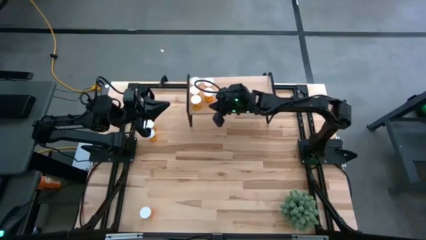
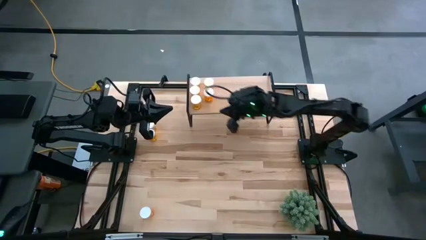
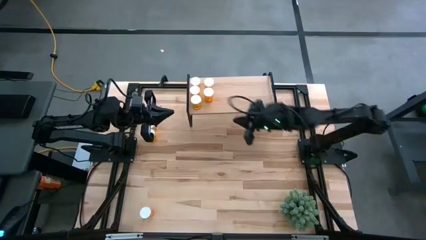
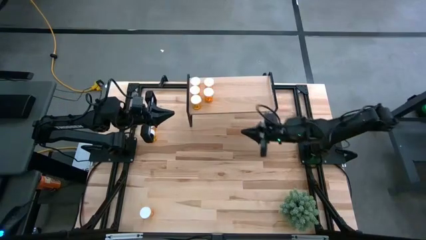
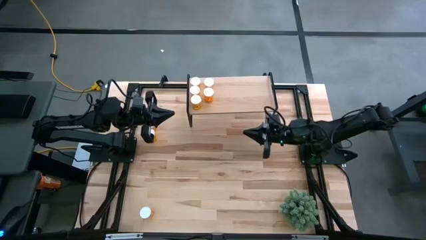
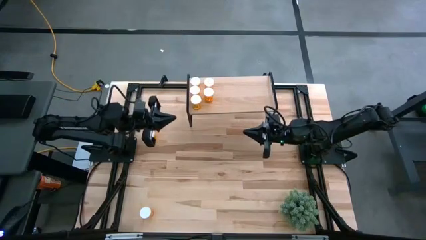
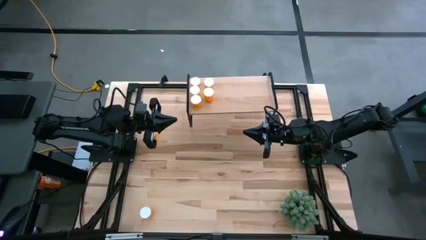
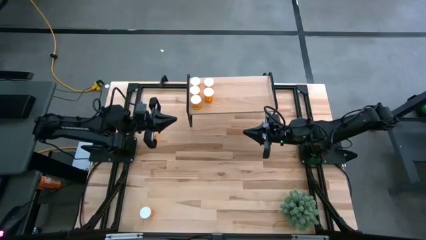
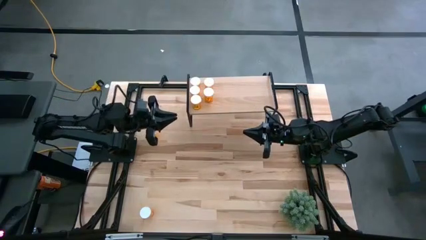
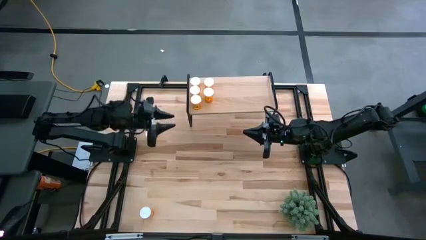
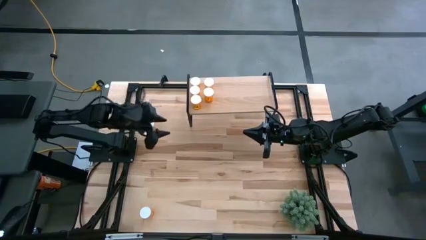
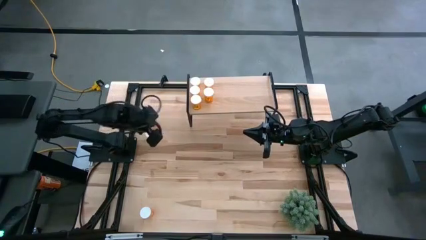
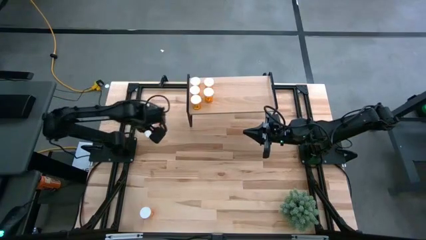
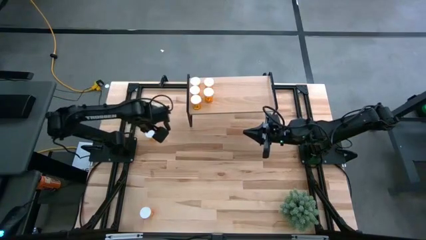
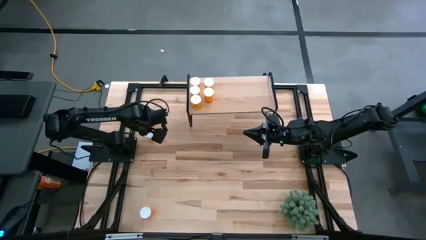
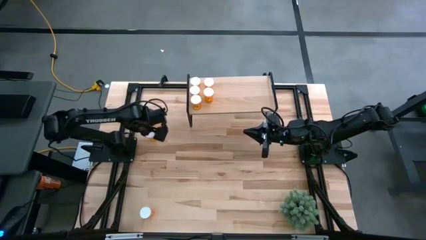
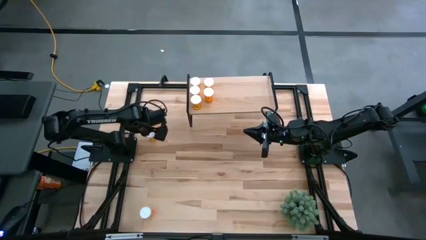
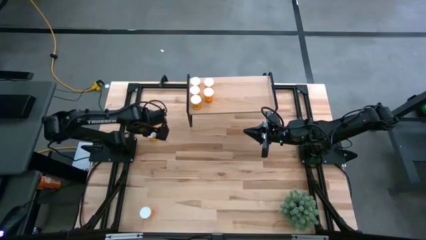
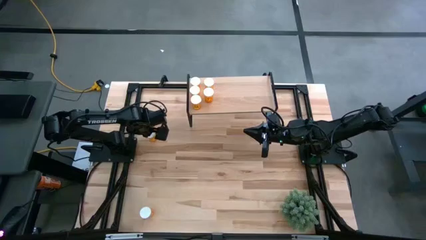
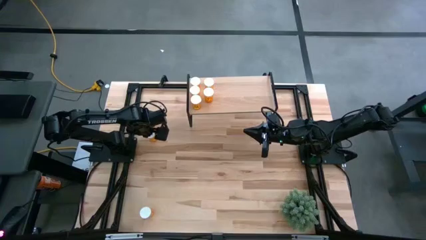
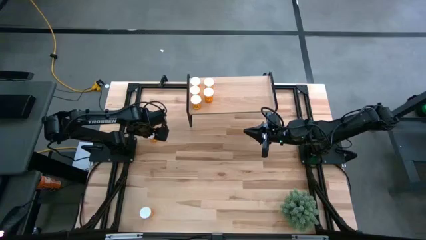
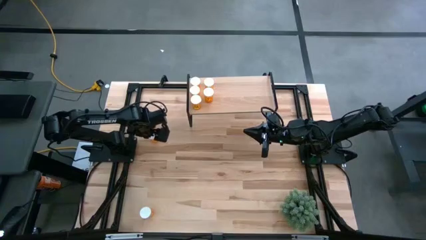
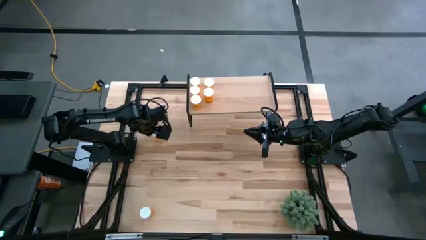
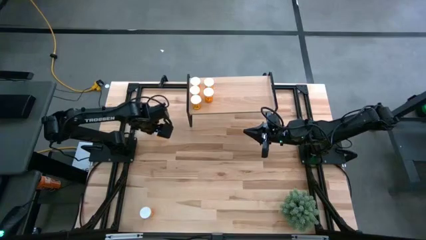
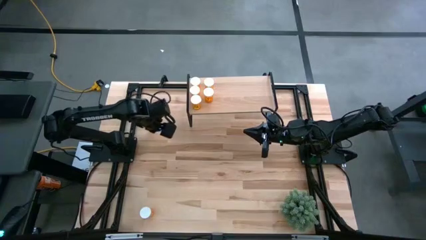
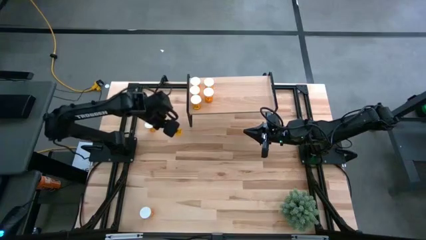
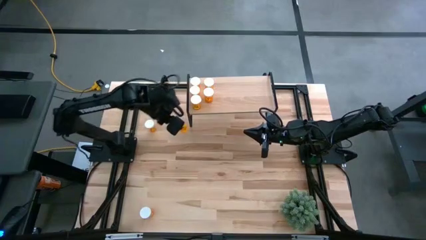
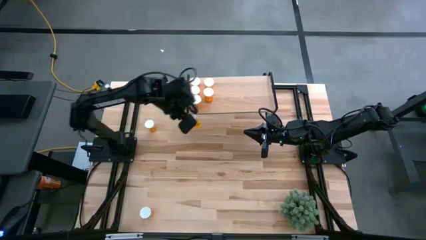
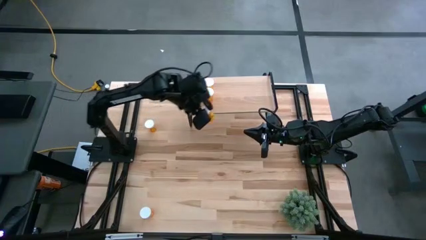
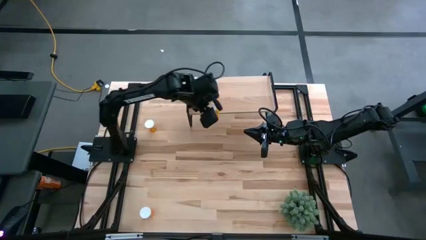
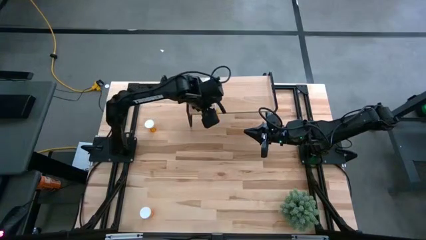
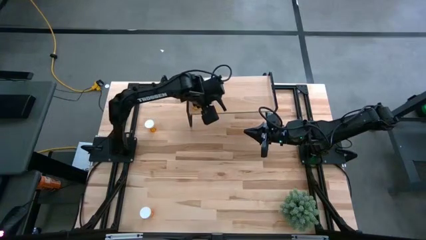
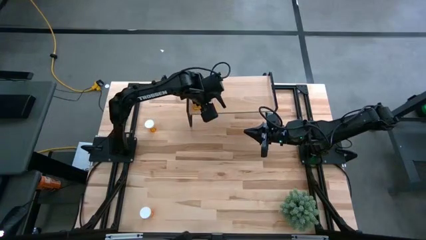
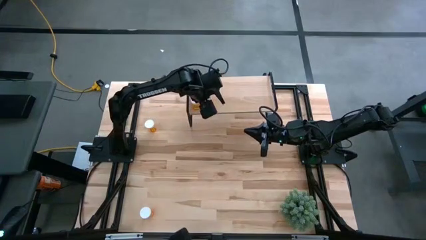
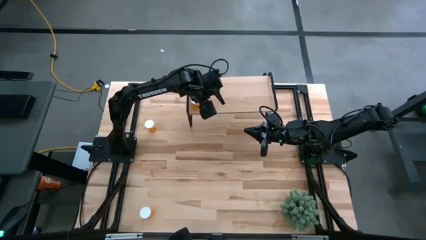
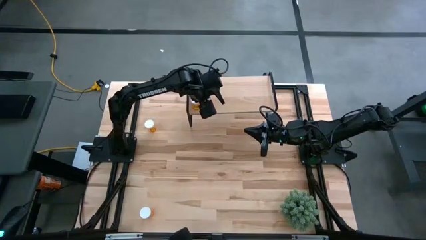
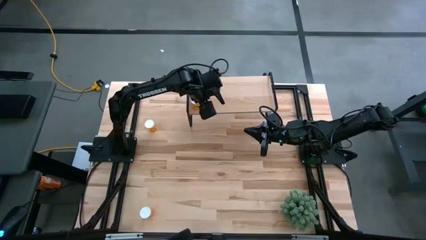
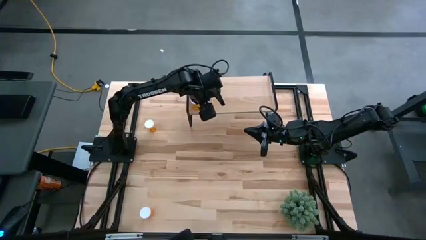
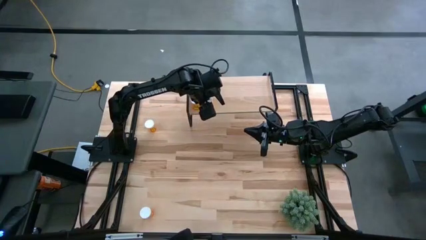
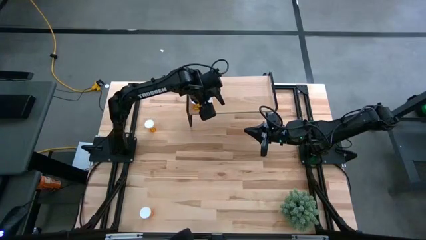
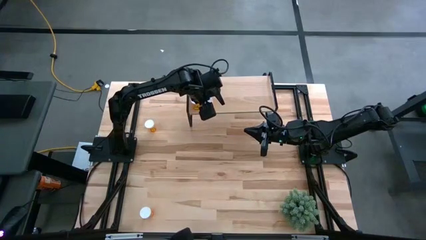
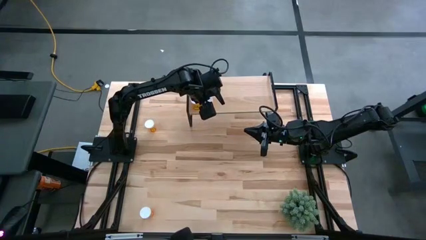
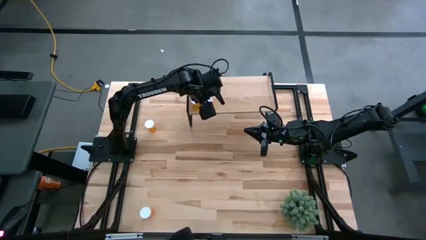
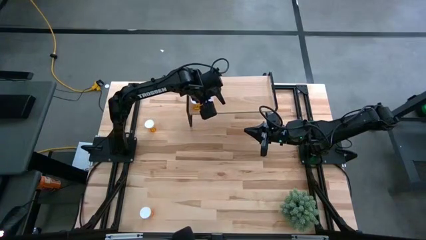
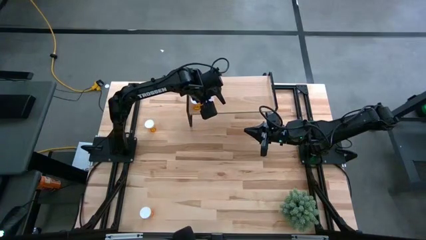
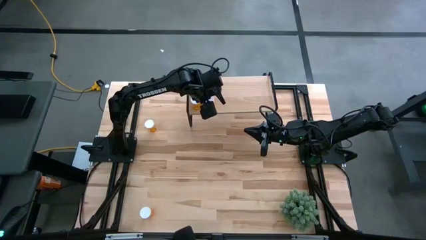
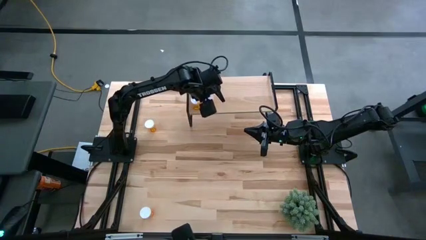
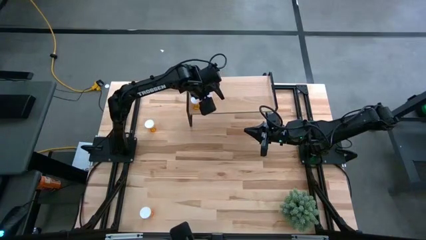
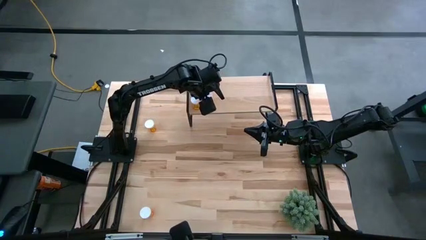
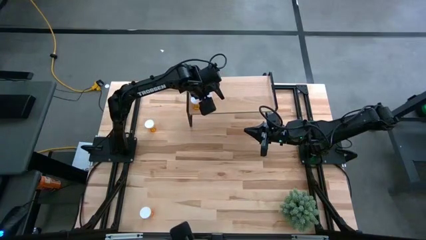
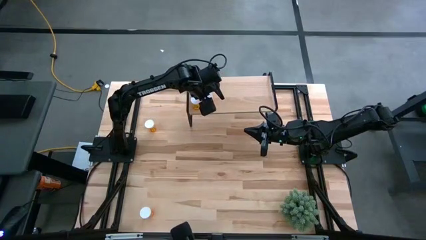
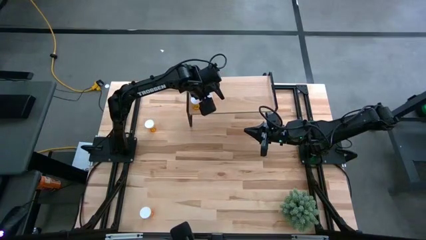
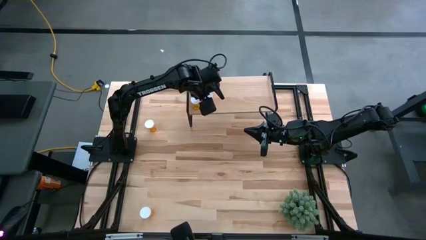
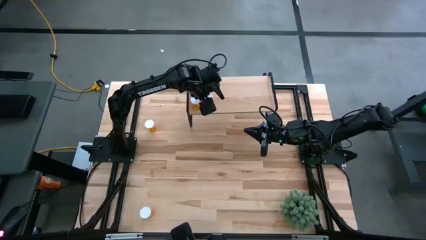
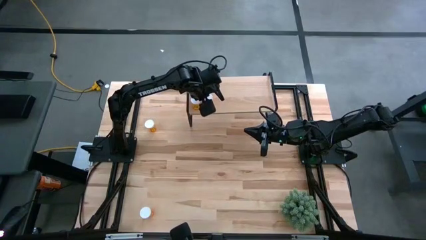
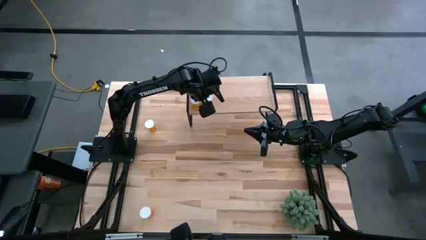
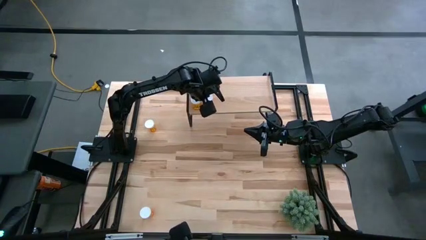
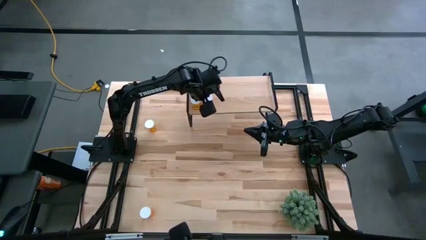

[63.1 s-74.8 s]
Task: Pick and place medicine bottles onto shelf by color
Put the orange pill bottle on the shelf aligned with the other orange pill bottles

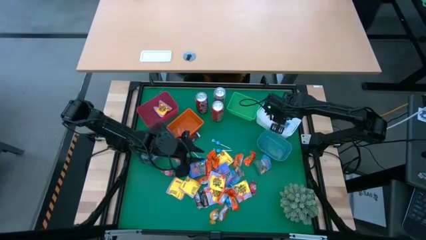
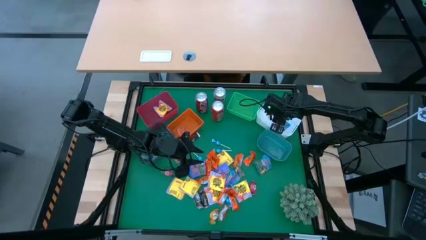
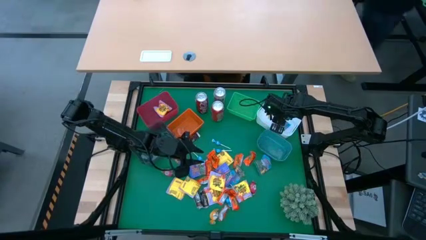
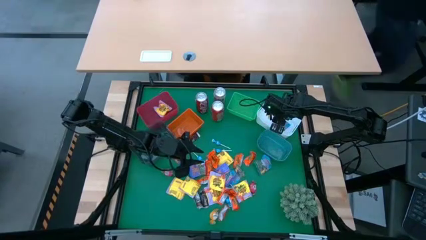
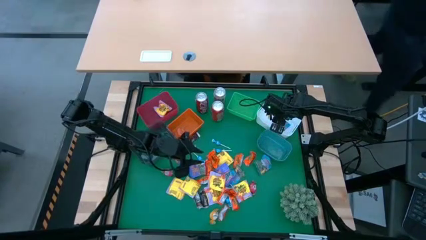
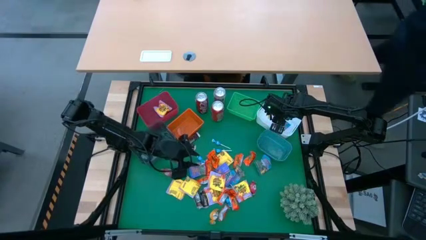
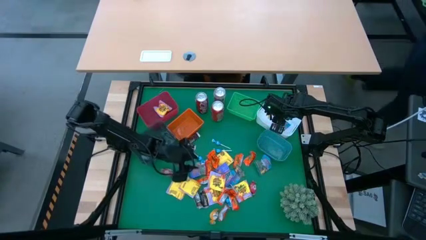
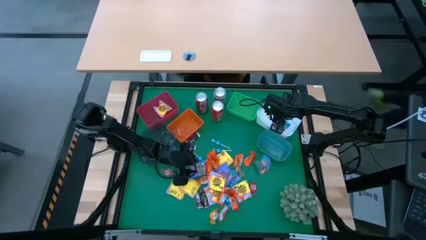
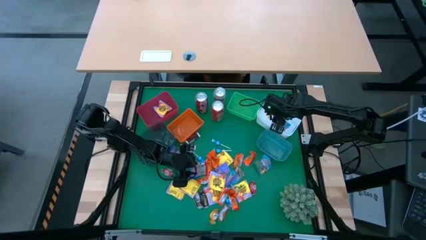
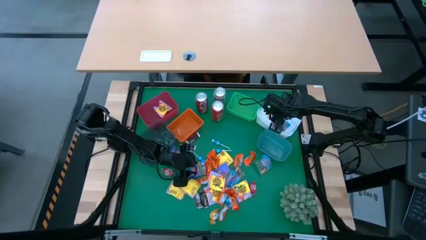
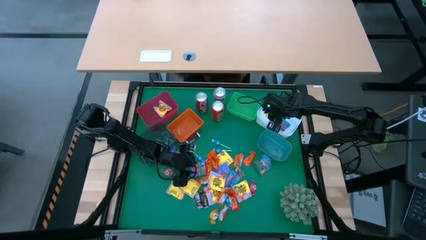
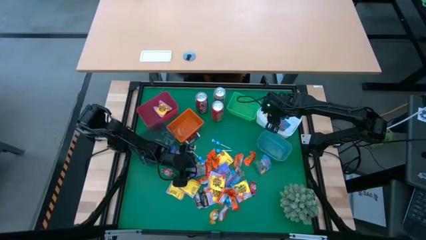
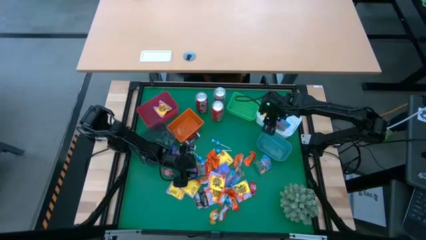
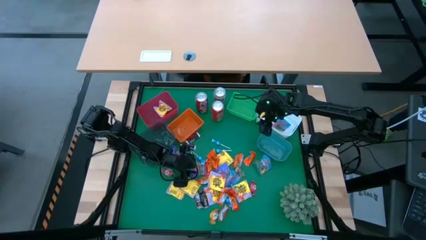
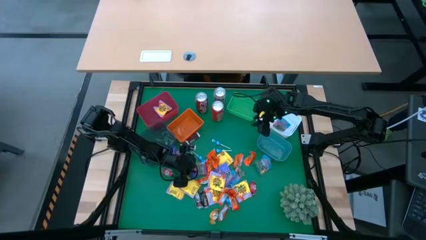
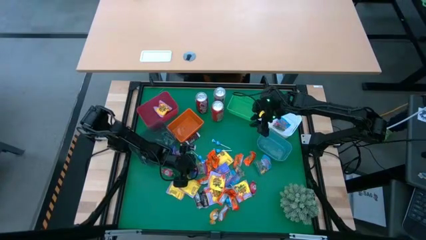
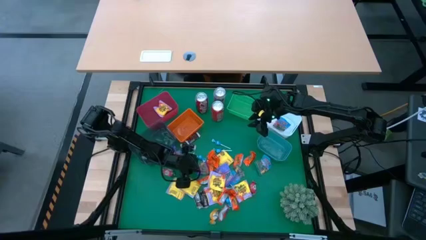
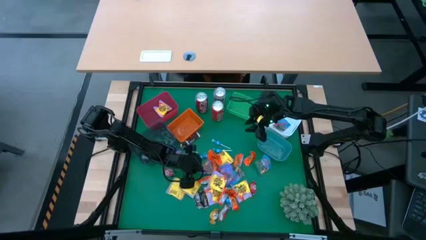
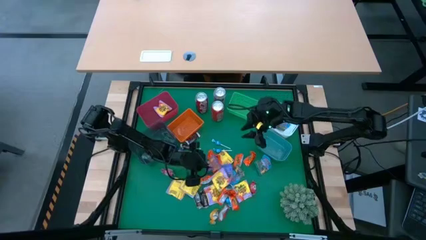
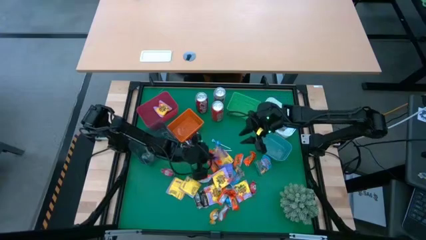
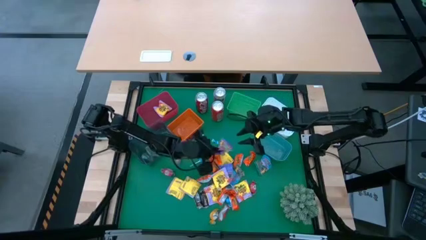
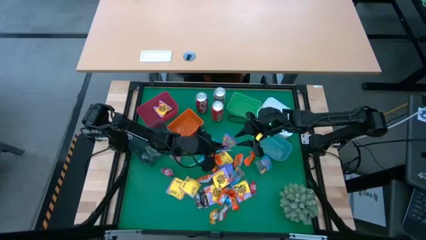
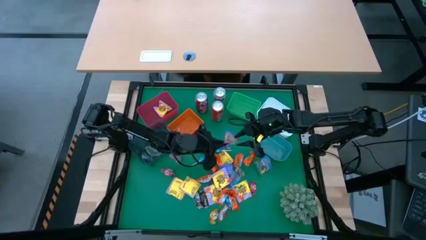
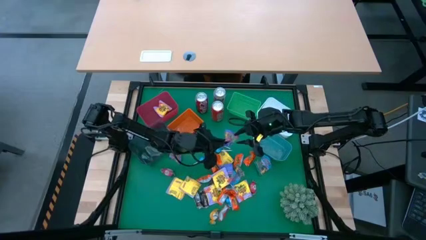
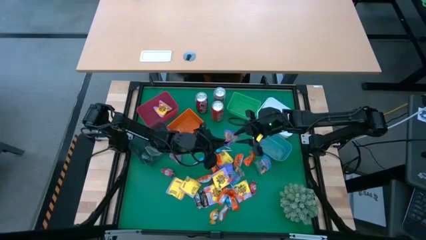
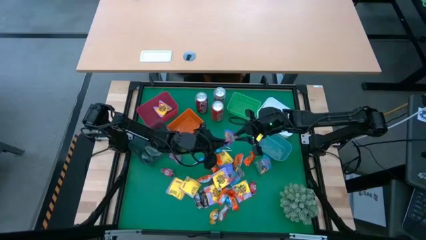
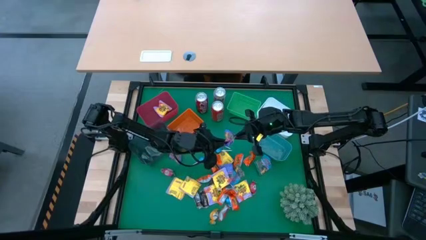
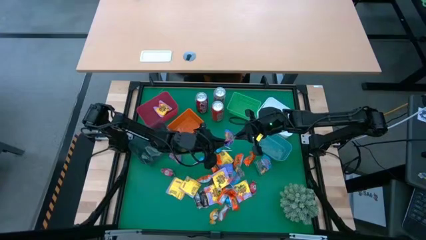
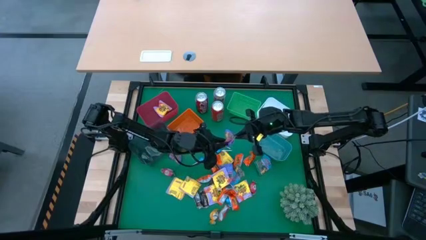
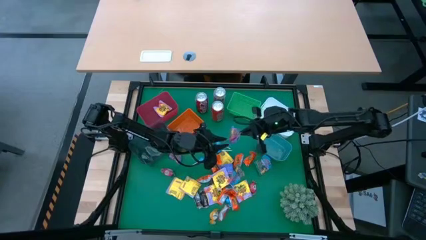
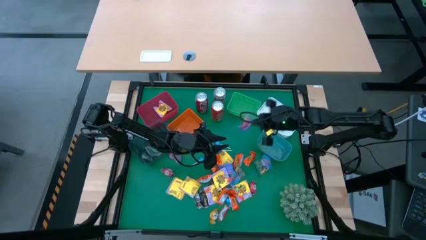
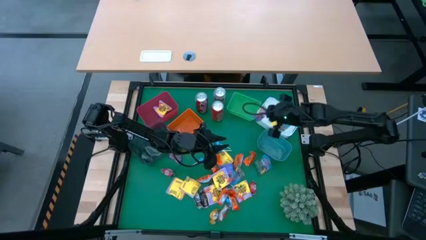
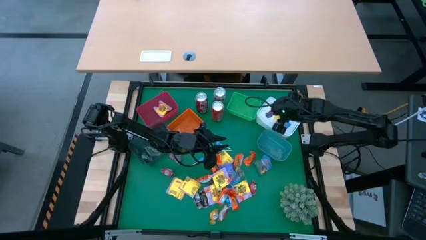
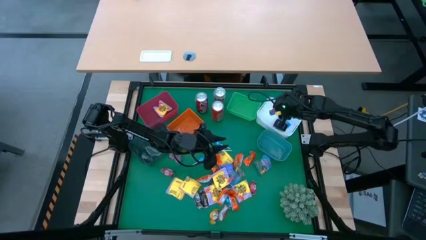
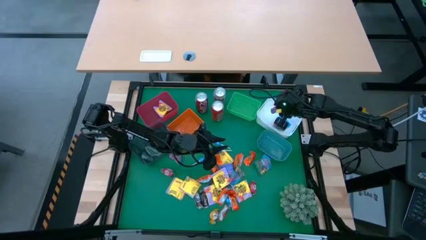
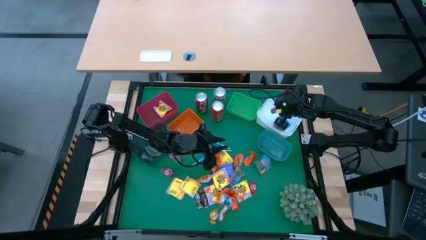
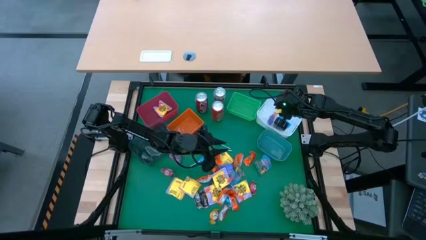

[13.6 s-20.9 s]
Task: Sort candy
Put the violet gummy into the white bin
